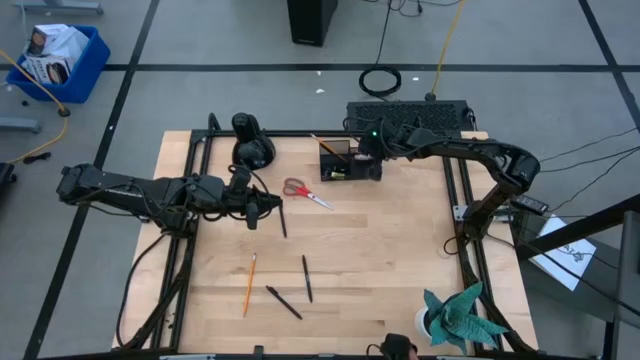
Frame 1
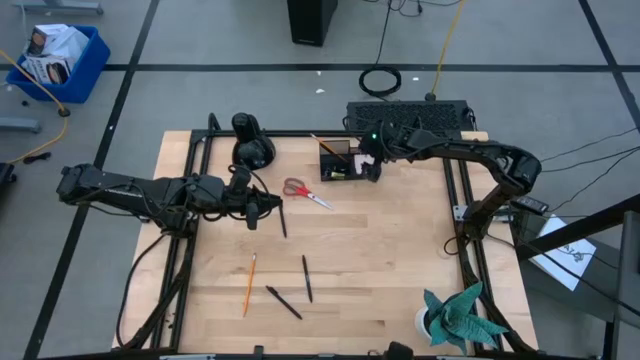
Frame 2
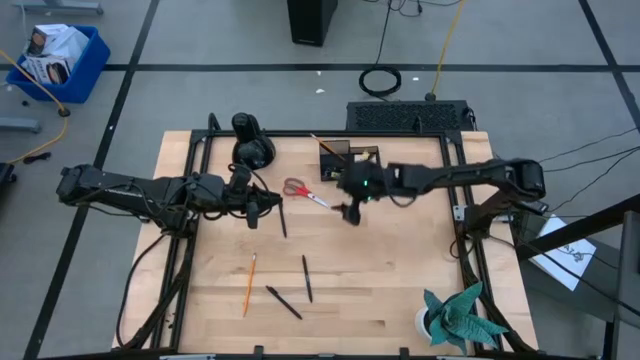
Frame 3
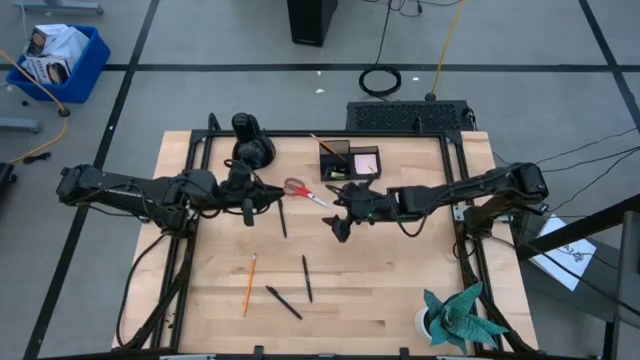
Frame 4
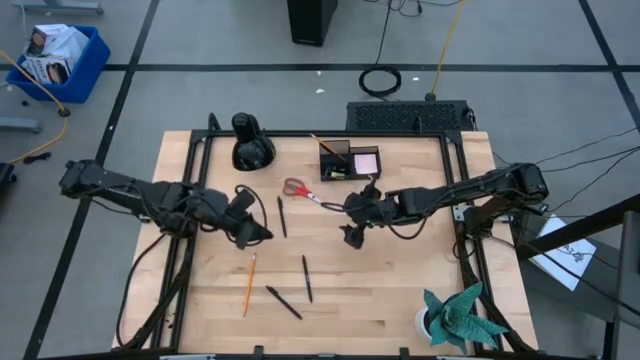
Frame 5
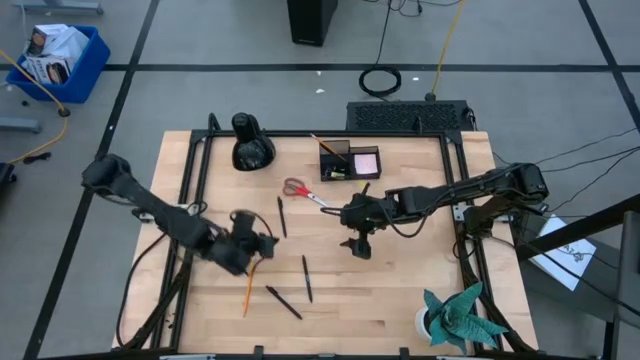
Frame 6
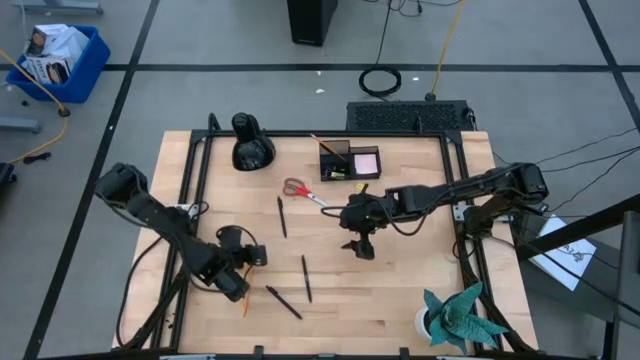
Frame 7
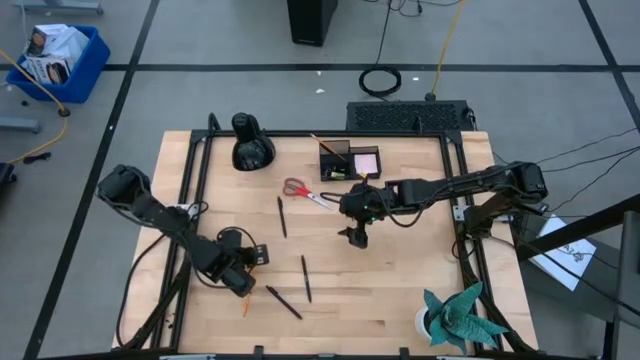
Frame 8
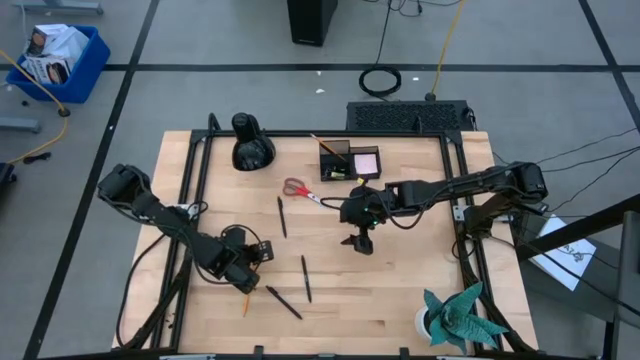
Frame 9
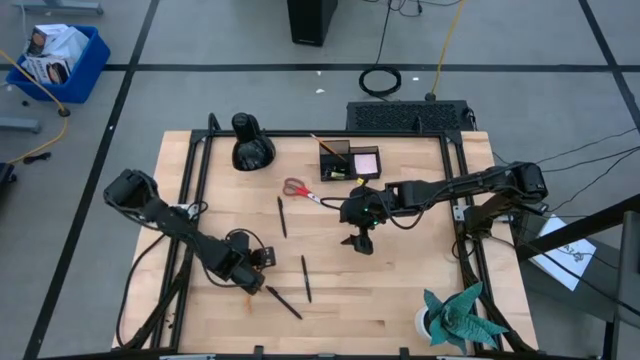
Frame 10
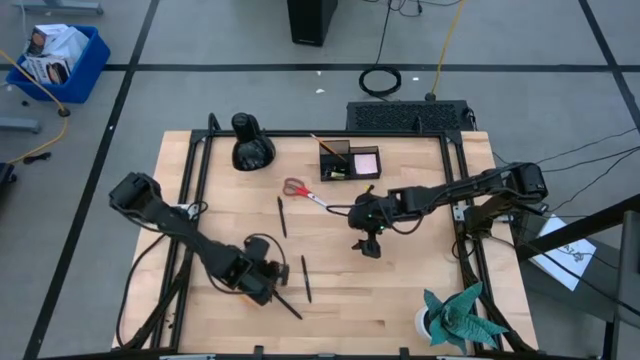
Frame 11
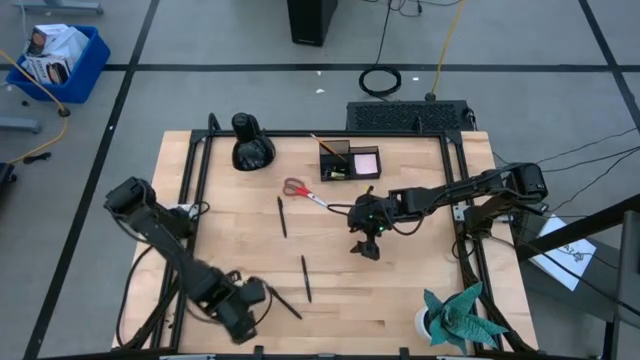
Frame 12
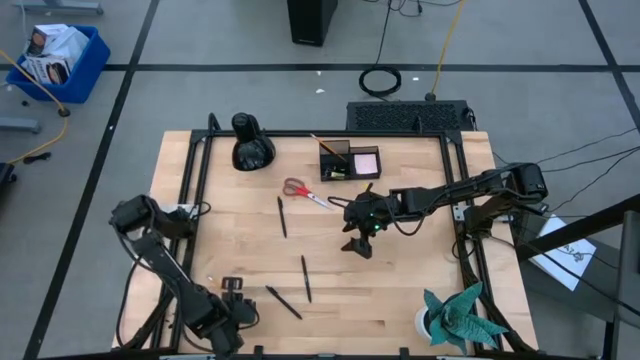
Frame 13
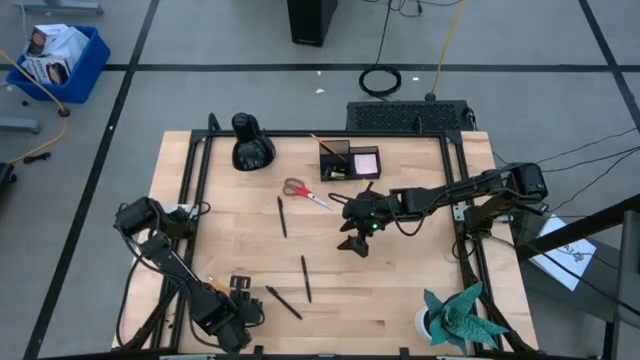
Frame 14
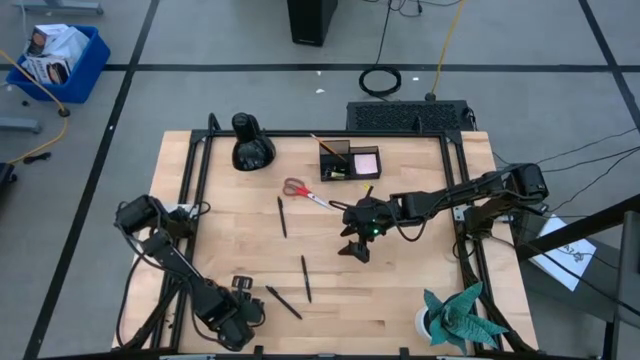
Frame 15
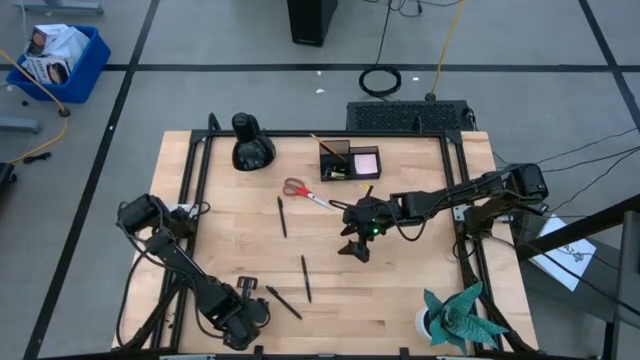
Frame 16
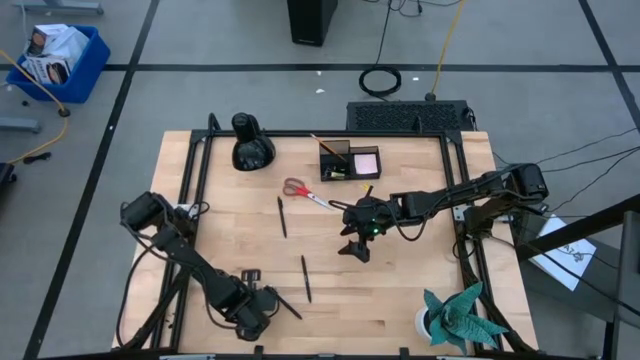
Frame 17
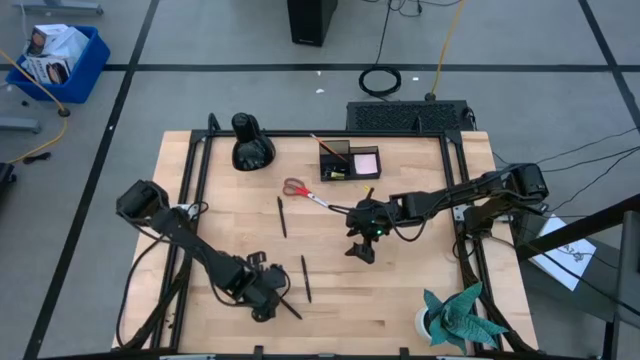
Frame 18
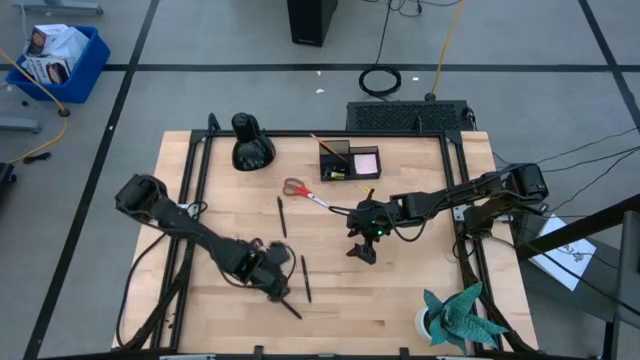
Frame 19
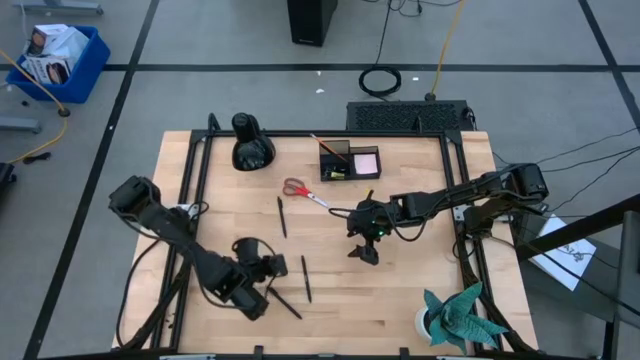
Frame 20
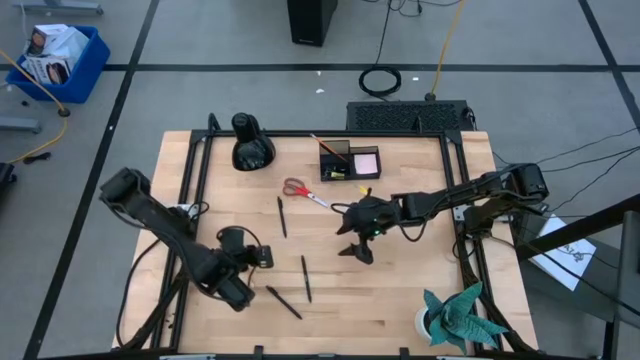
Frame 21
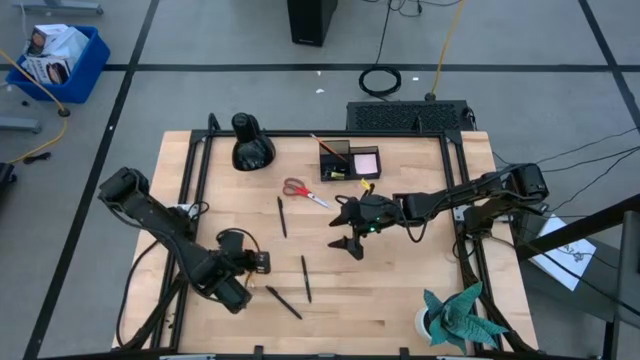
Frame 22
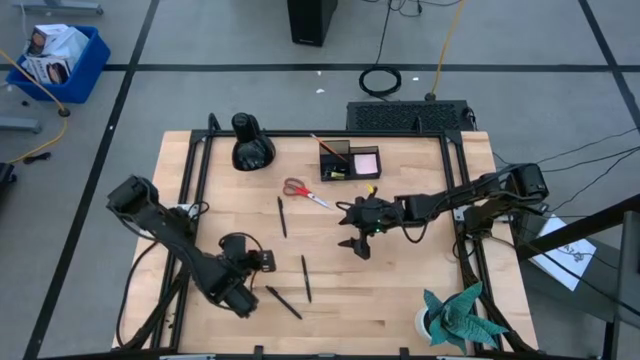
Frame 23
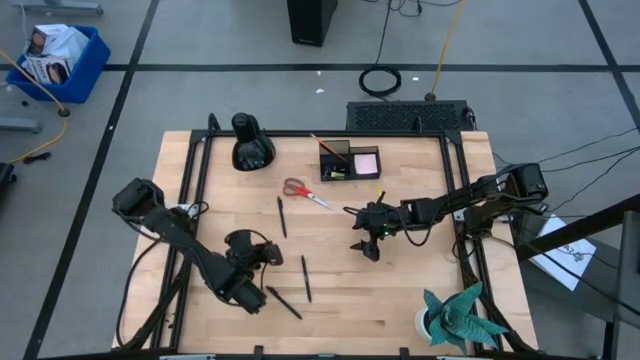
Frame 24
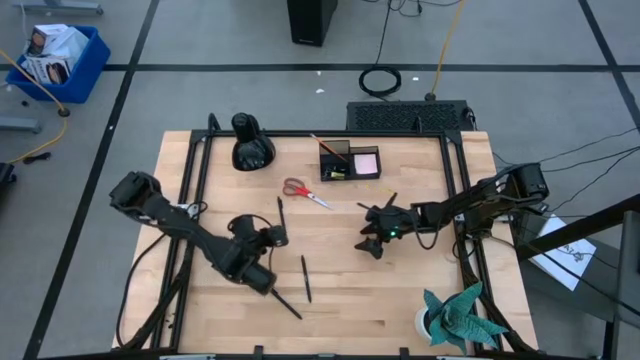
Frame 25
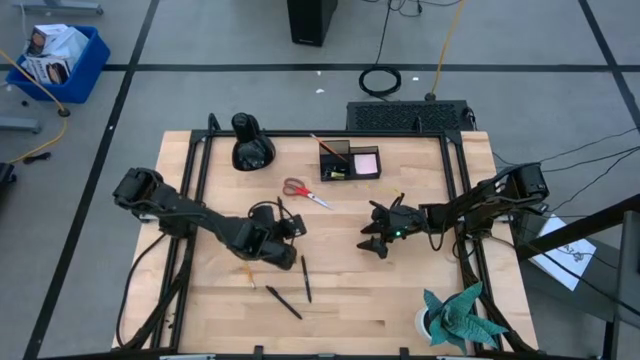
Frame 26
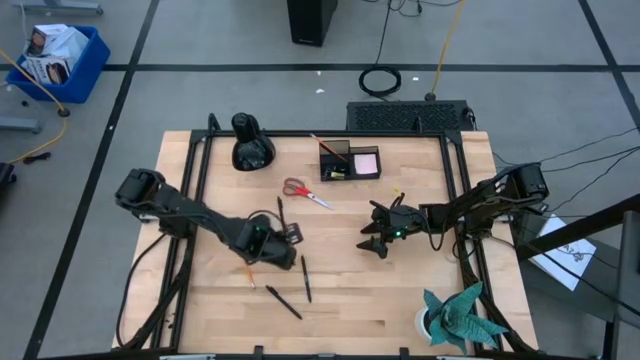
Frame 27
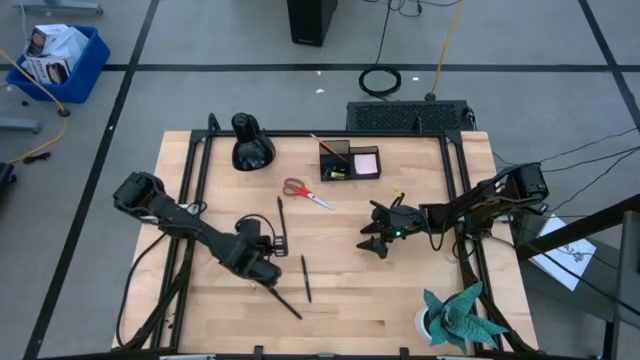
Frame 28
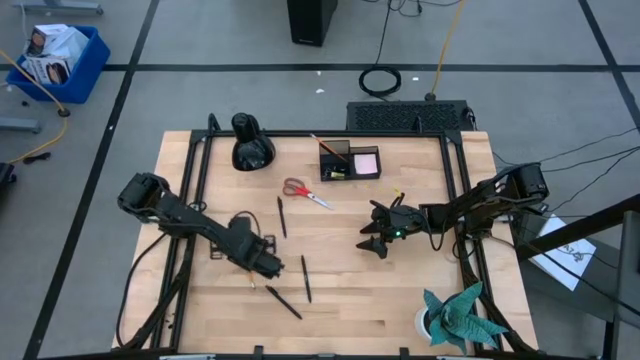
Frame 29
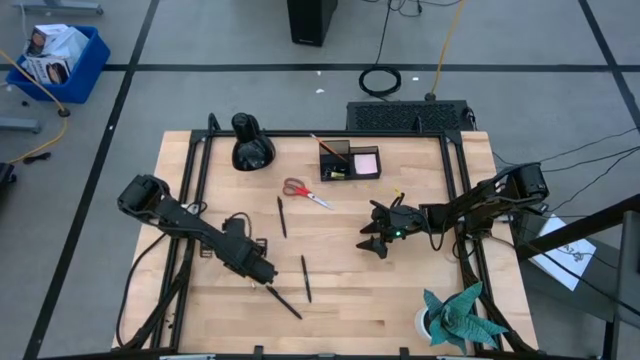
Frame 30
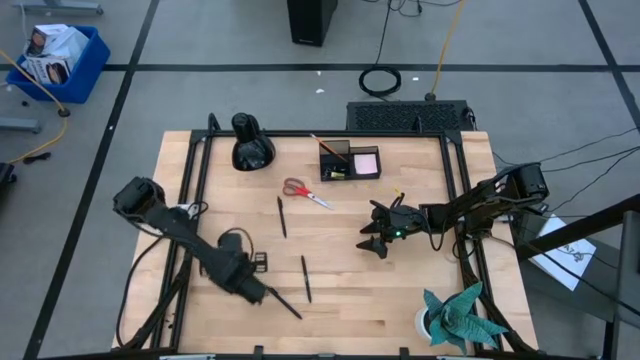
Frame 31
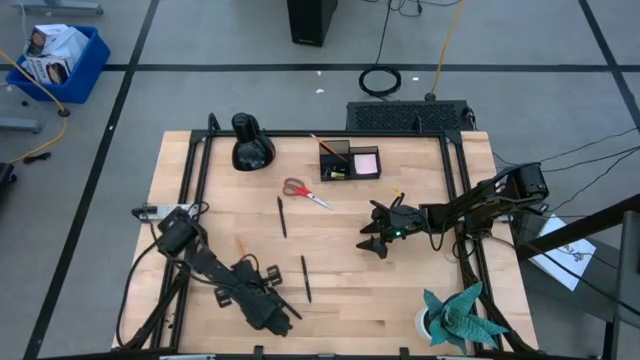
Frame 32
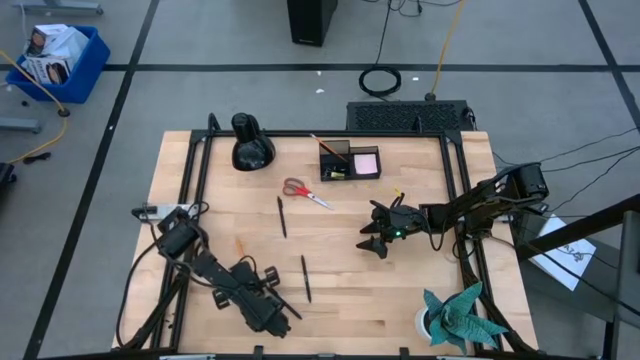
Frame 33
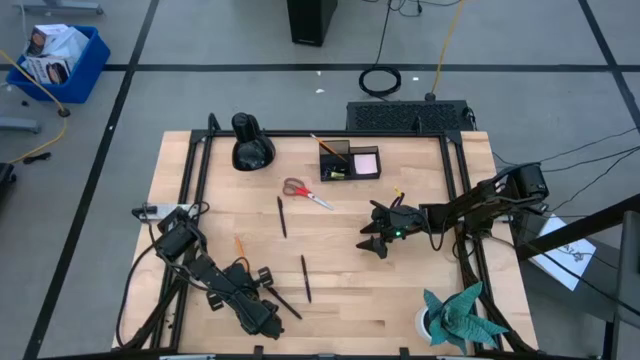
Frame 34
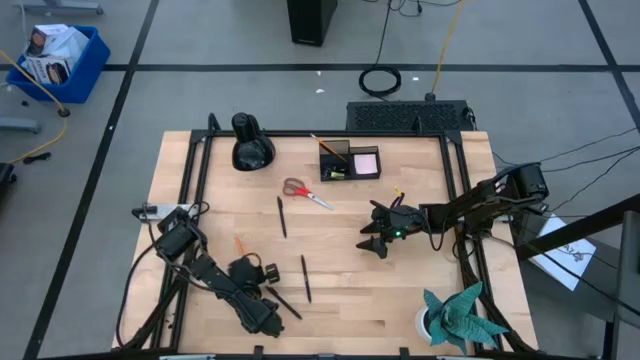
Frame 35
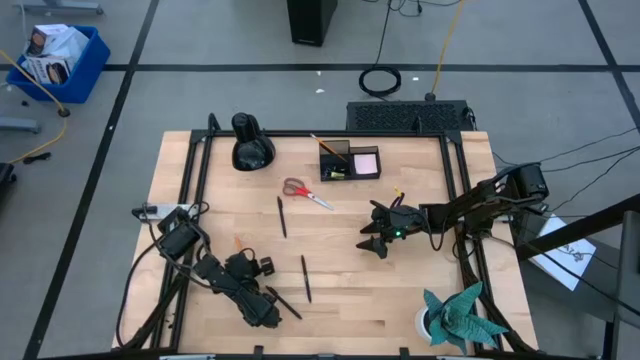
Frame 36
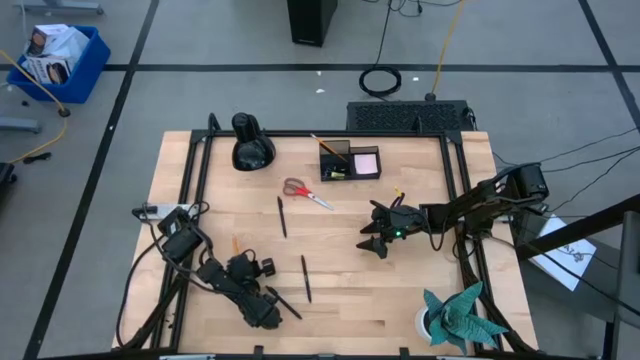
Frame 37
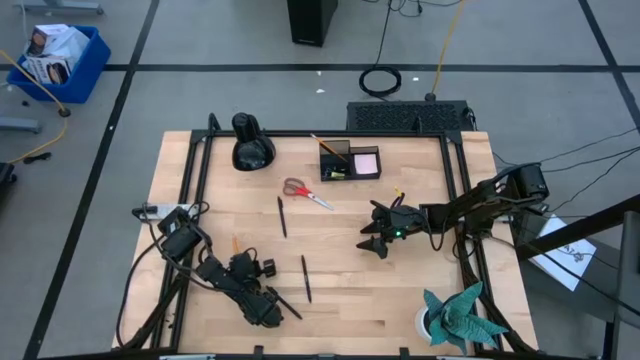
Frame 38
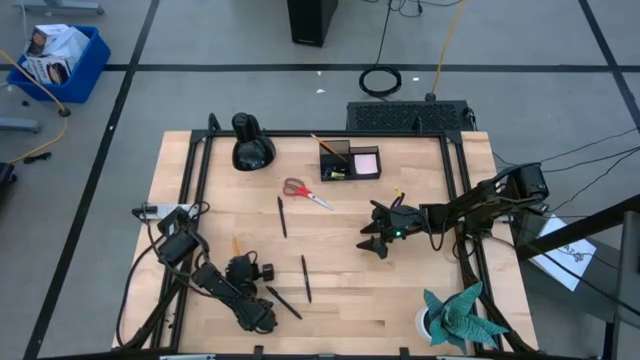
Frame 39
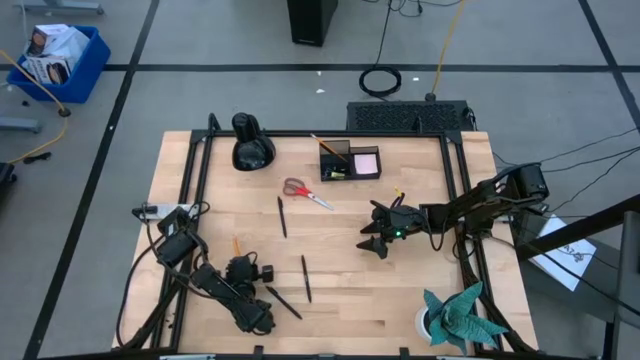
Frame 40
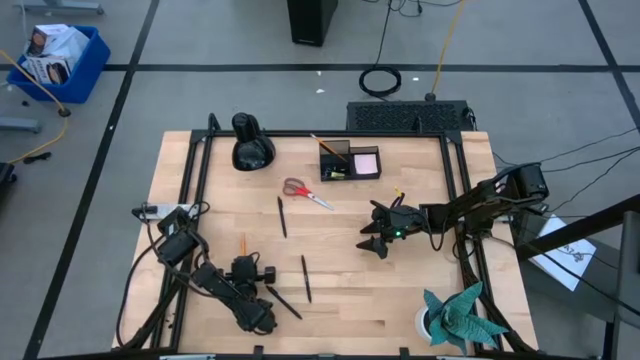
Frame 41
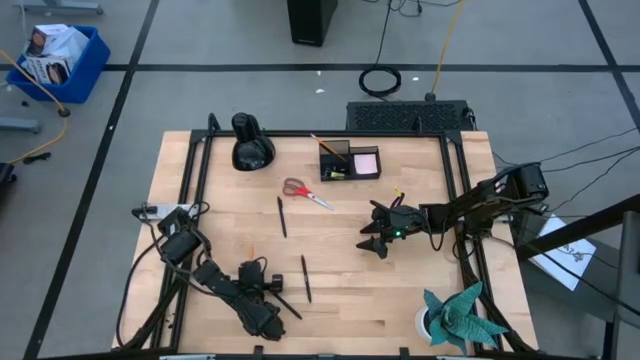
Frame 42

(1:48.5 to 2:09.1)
Task: Pick and place office supplies into organizer
Put the orange pencil into the black desk organizer

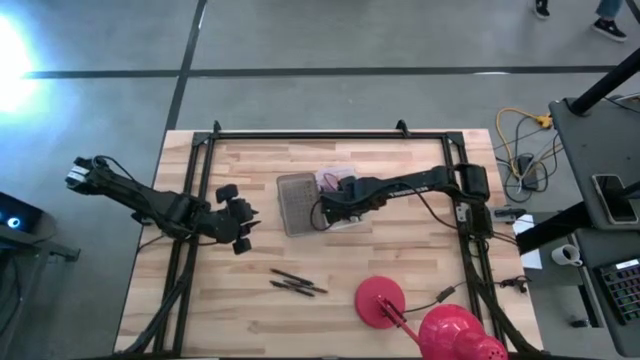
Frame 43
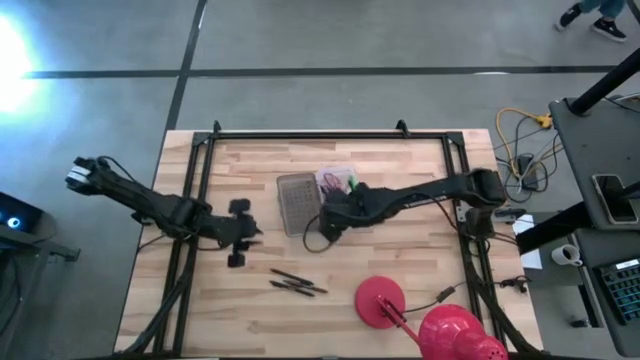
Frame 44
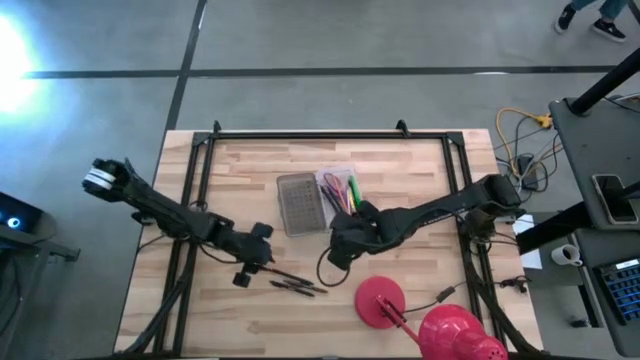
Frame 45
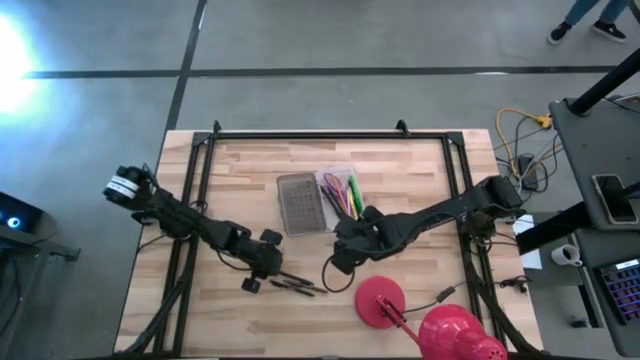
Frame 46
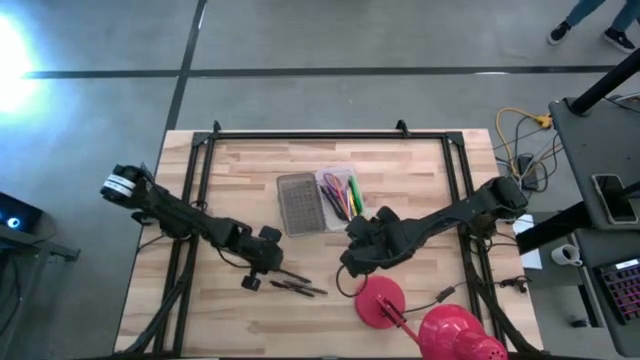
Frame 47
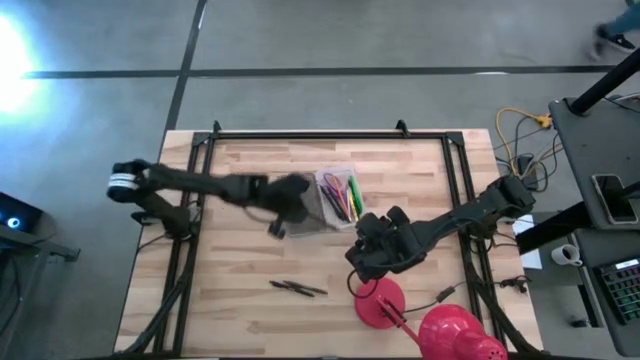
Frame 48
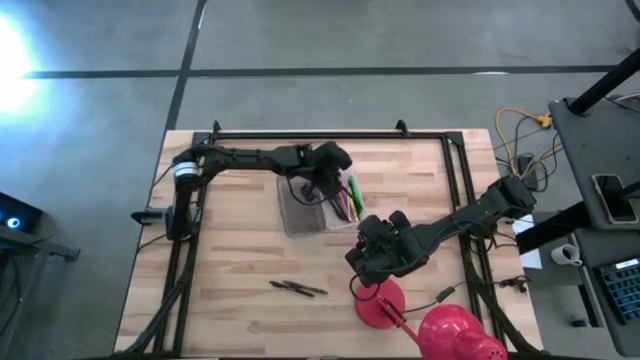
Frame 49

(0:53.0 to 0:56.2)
Task: Pick & place school supplies into a supply box
Put the black pen into the black supply box
